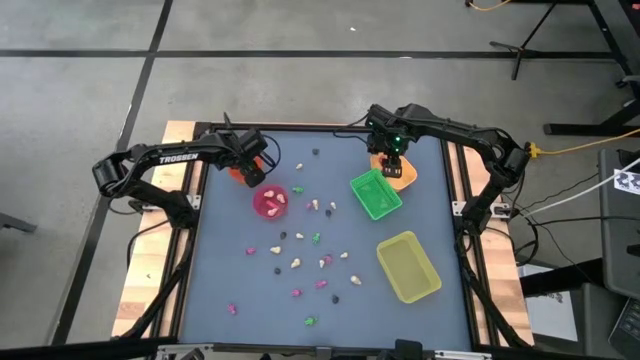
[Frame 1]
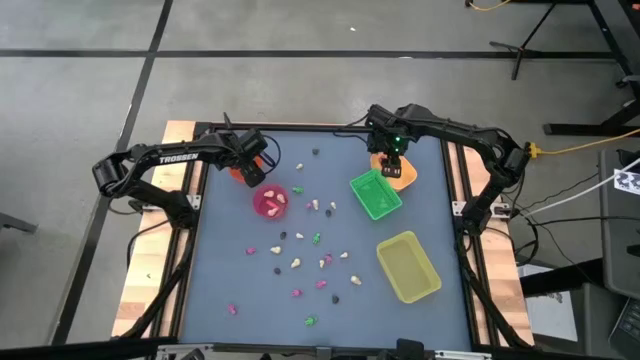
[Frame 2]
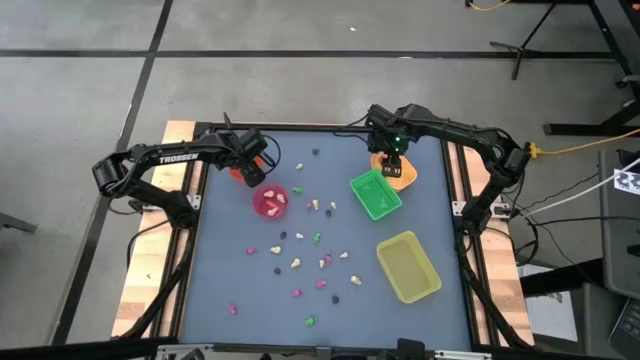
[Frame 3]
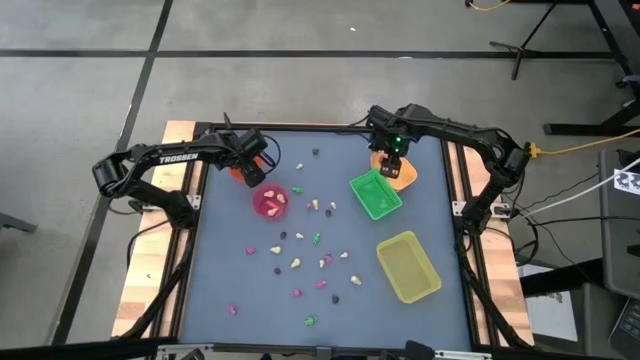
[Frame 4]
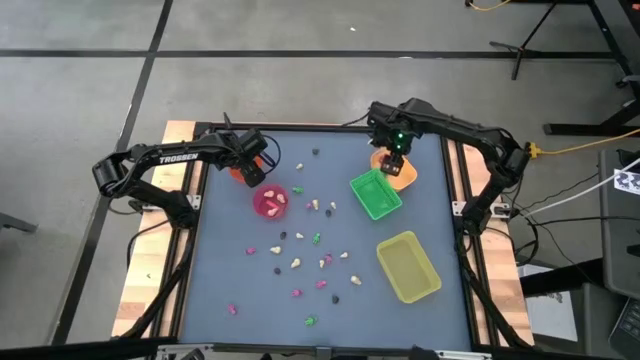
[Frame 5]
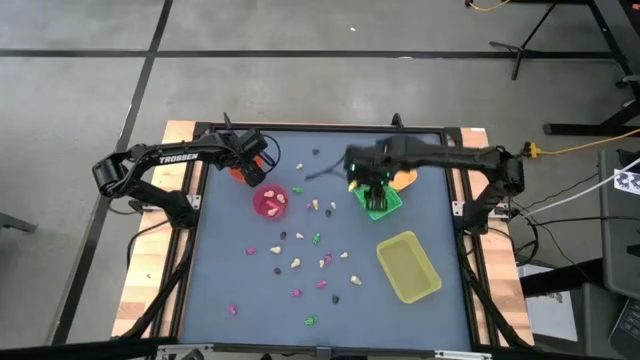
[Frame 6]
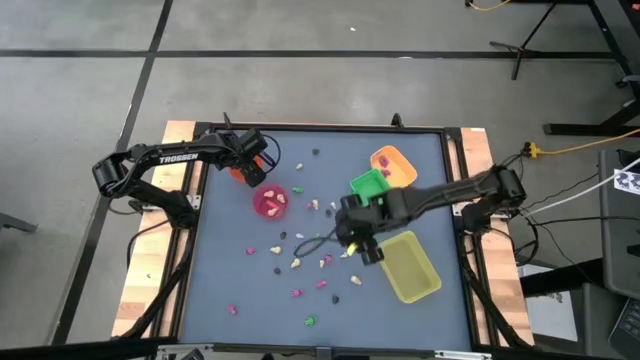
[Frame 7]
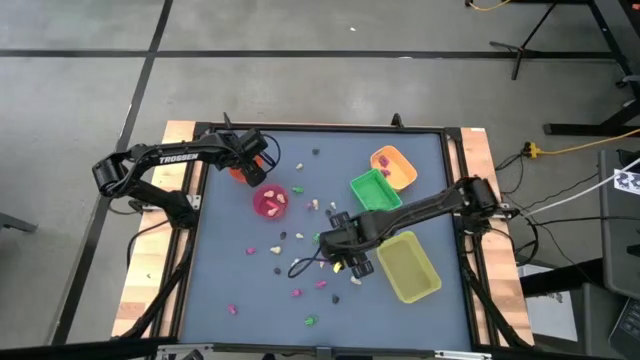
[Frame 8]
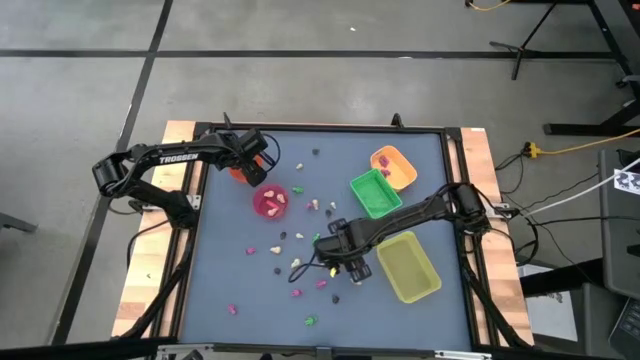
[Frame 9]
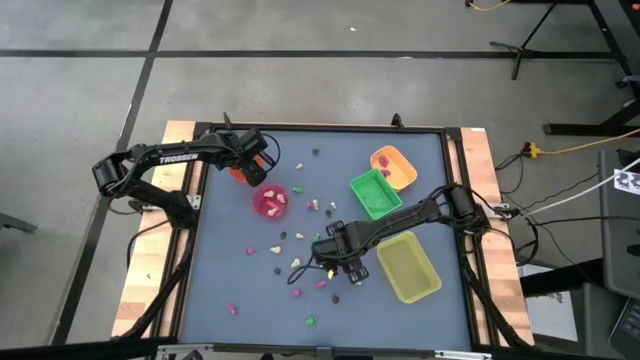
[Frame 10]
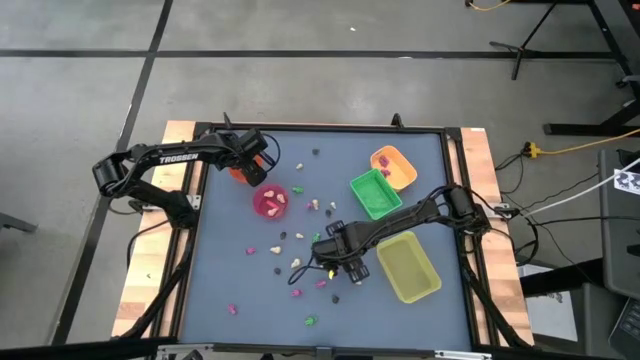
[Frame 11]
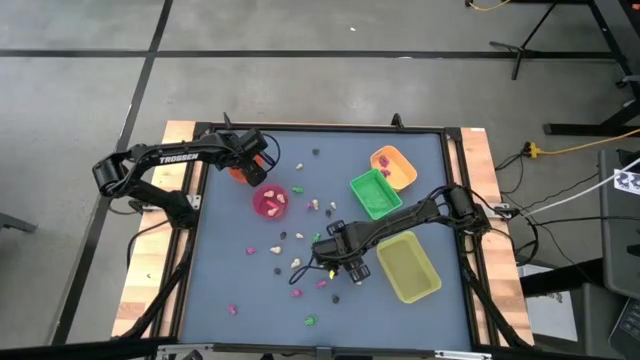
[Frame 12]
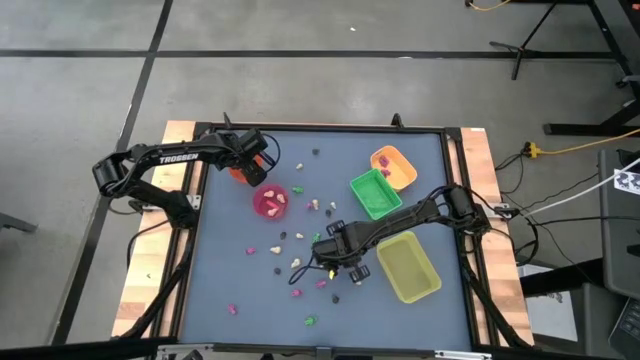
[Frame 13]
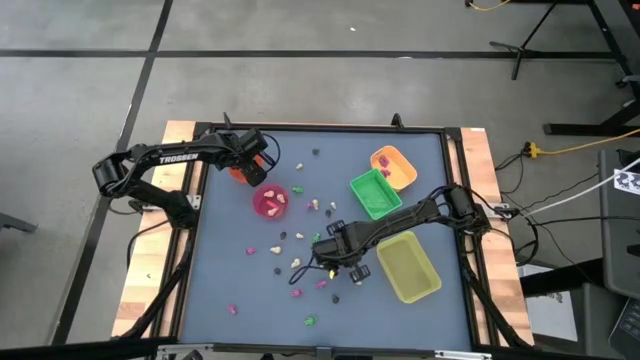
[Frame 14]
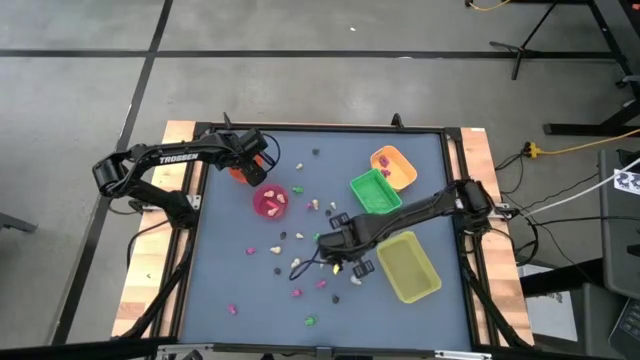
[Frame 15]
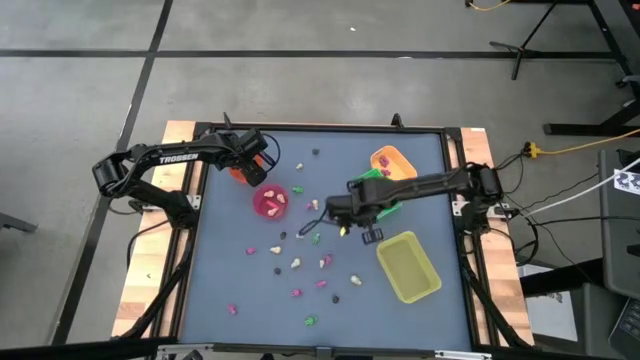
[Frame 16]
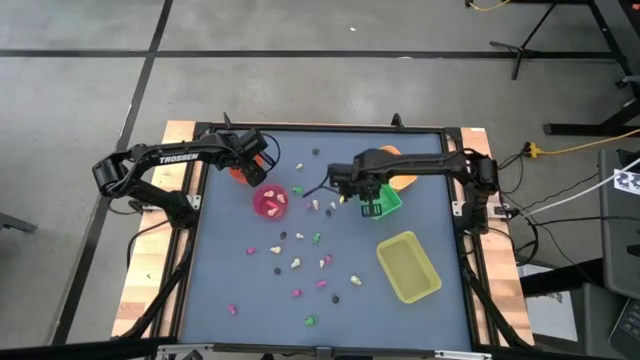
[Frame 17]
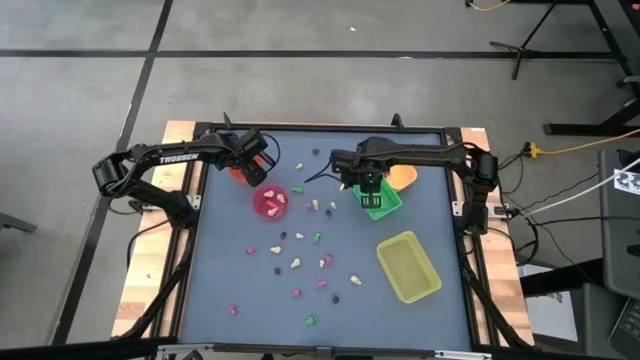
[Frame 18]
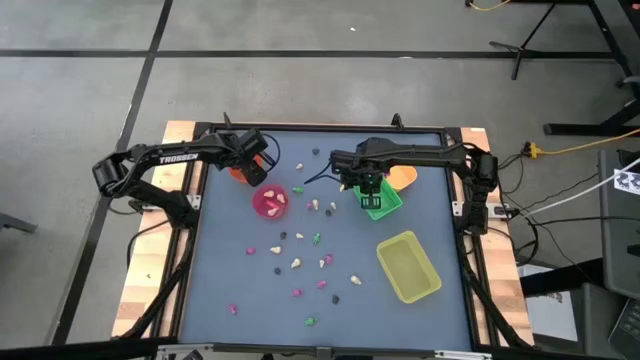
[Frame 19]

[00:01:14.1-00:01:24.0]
Task: Sort Halloween decoration
Put the white skull toy into the green bin

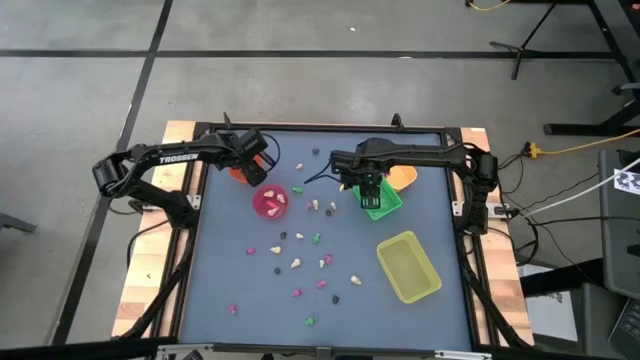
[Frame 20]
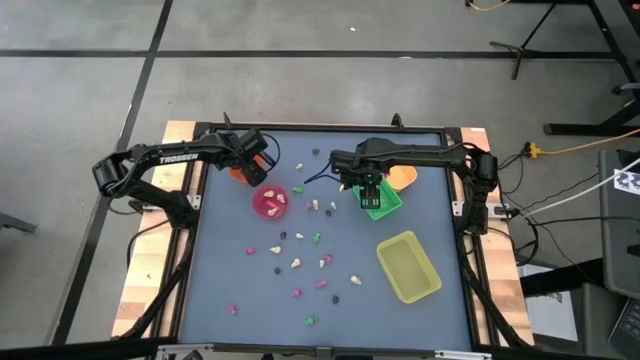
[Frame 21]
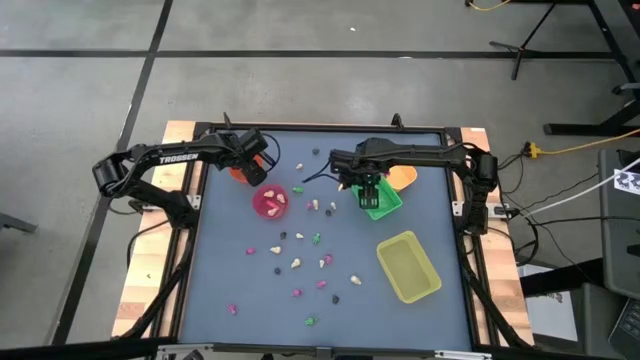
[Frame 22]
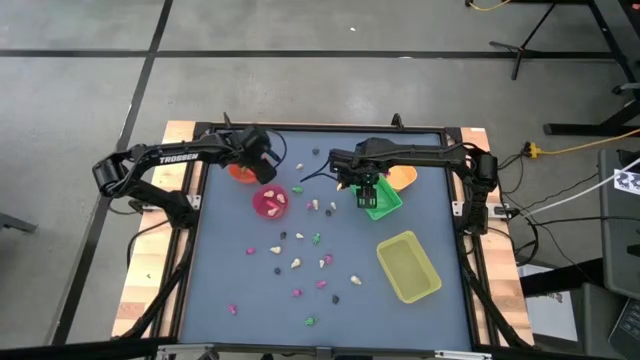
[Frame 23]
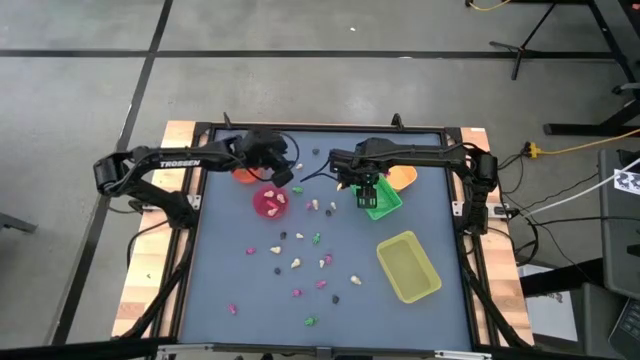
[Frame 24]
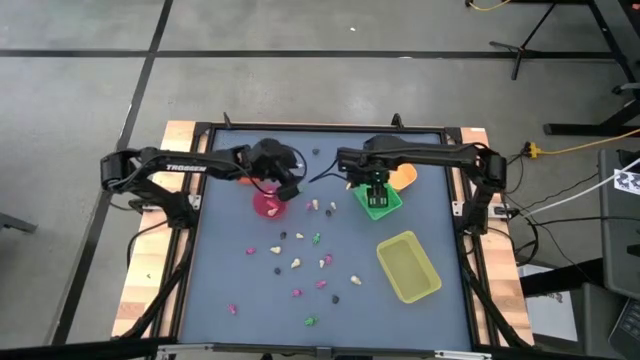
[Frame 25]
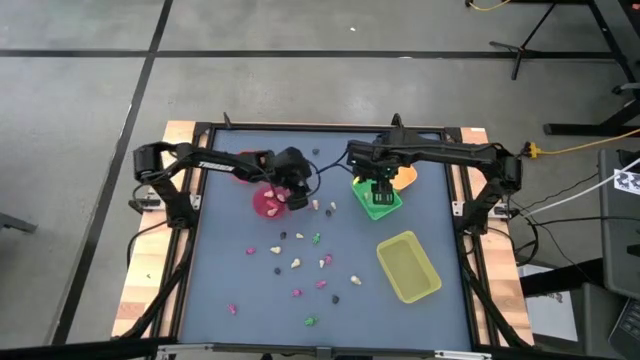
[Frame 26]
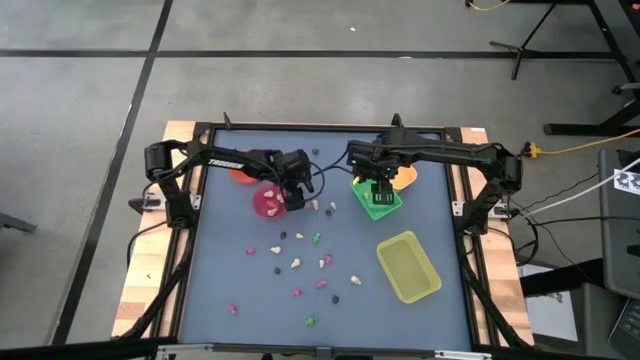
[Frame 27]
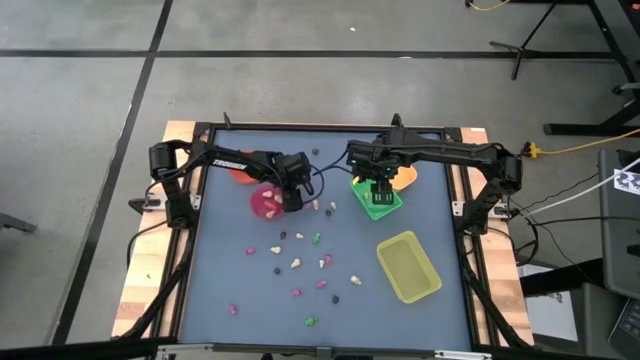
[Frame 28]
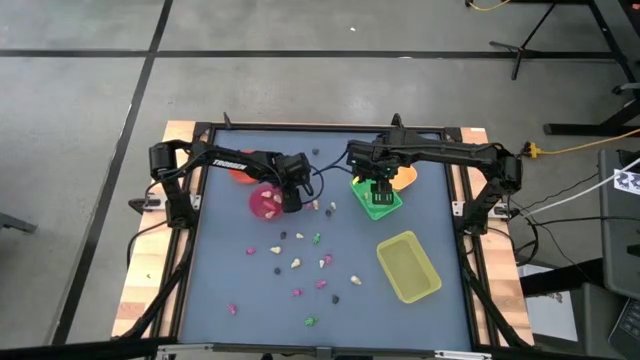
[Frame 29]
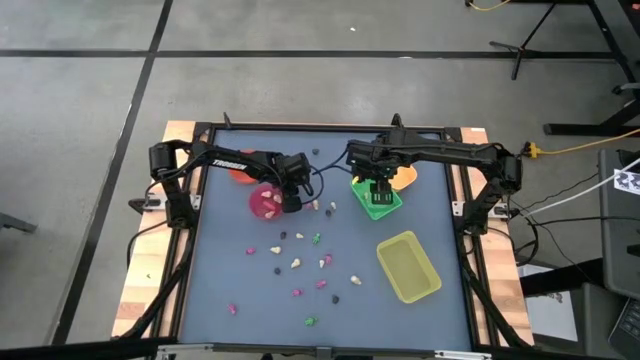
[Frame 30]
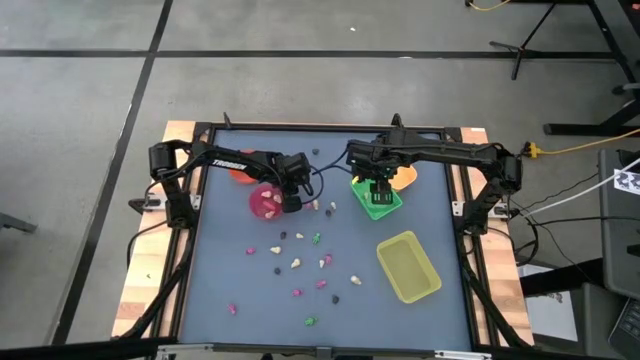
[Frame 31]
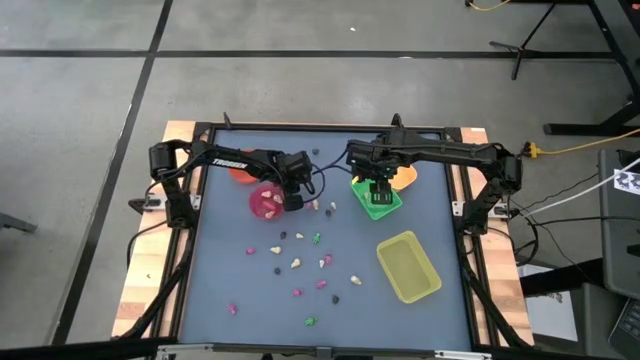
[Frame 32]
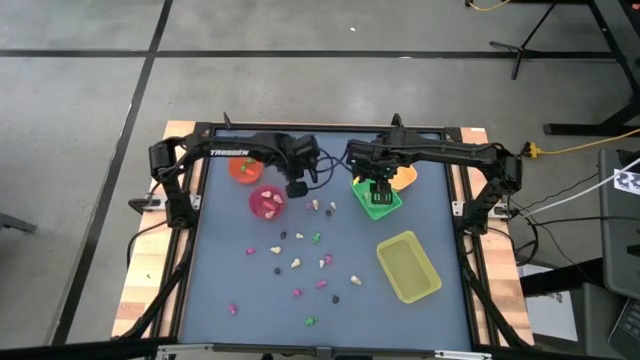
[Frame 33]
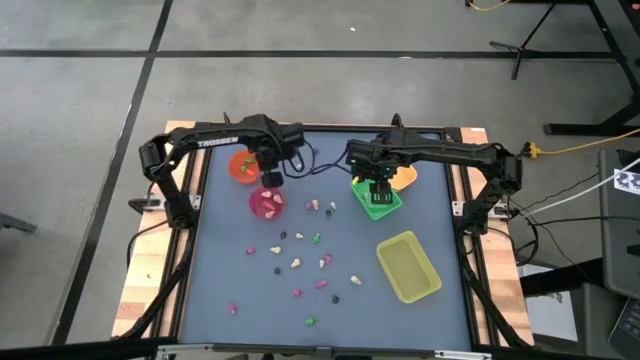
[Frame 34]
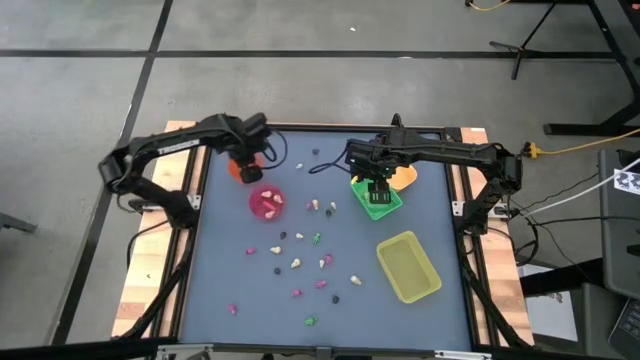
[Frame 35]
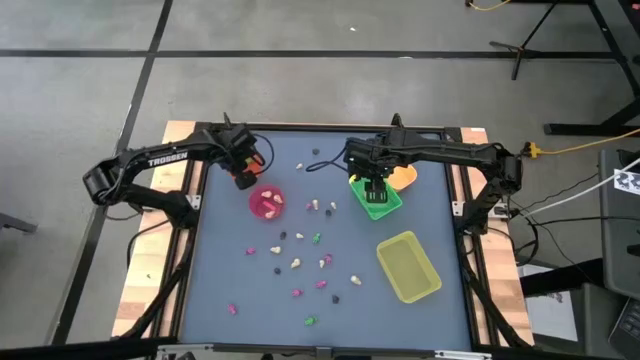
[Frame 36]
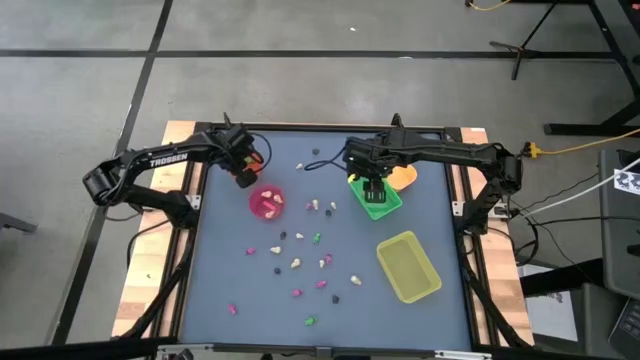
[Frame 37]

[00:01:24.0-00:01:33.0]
Put the green skeleton toy into the orange bin

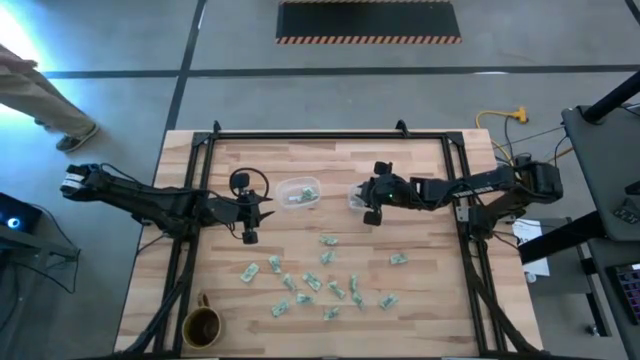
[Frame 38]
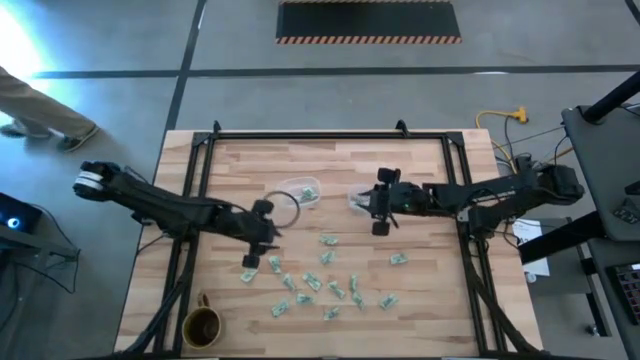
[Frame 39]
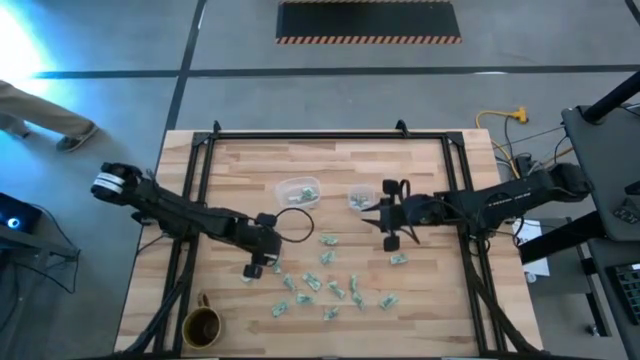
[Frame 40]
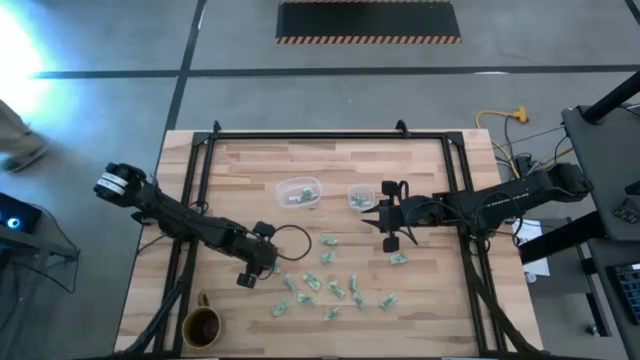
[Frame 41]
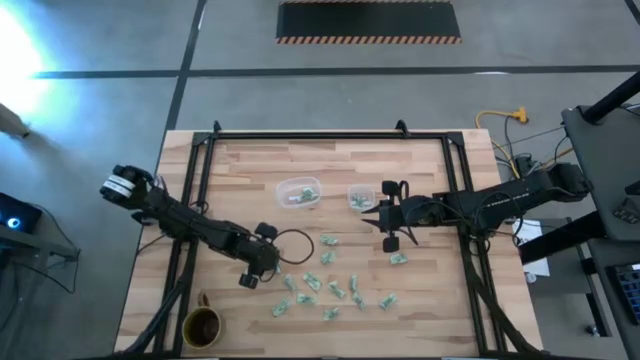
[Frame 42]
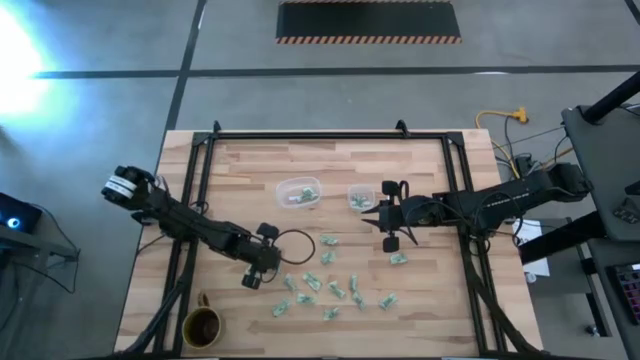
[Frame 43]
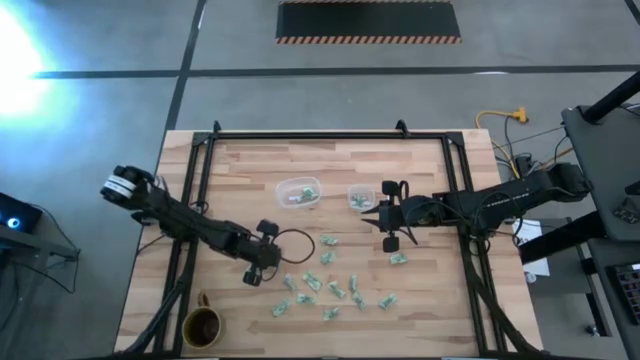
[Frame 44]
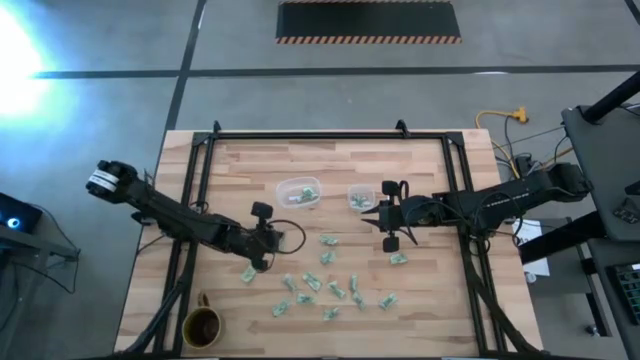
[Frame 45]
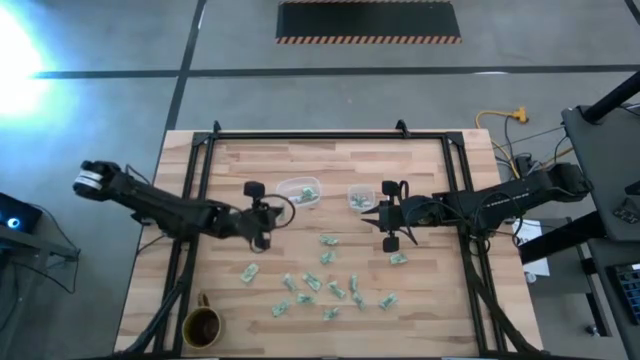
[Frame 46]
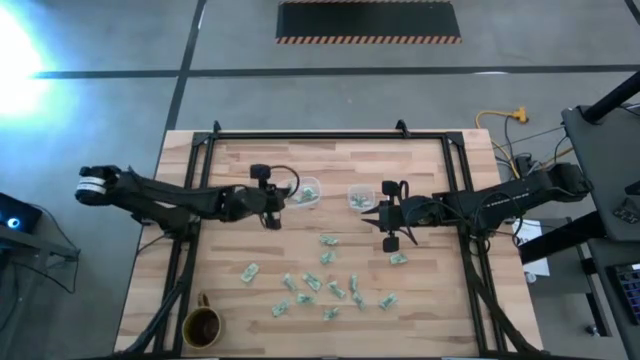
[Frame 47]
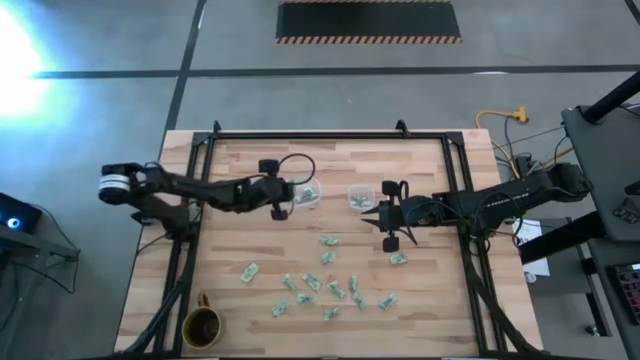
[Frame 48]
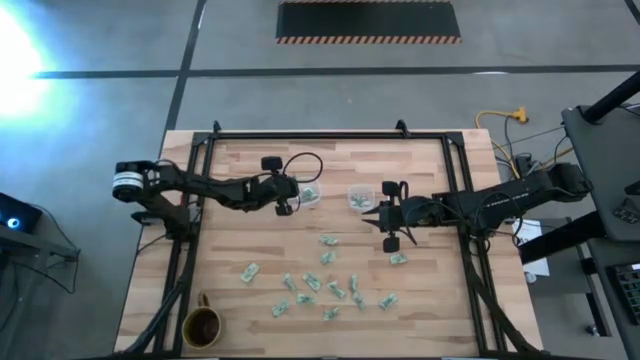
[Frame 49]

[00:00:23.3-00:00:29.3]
Task: Pick and place Stevia / Truvia into bins
Put the stevia packet into the transparent oval container
